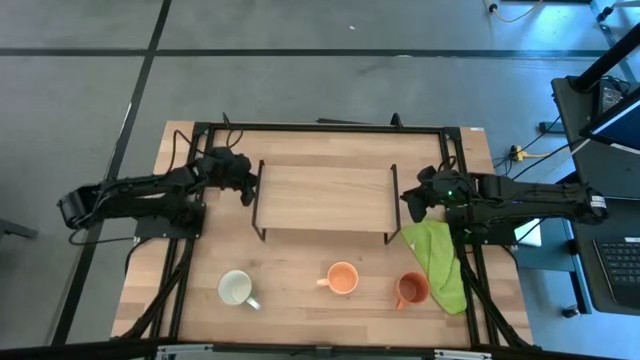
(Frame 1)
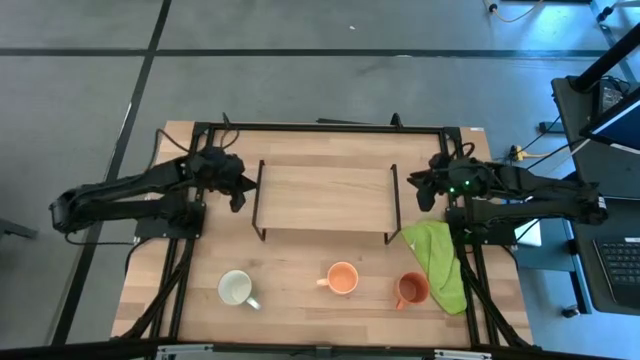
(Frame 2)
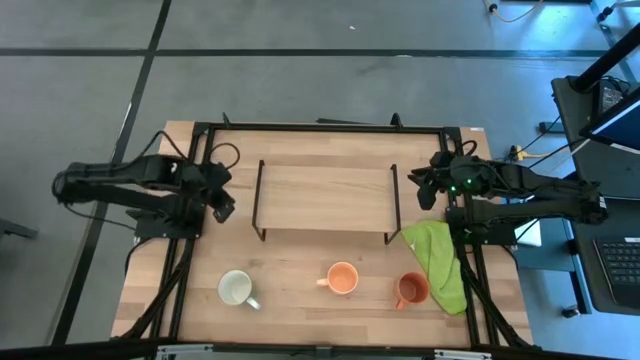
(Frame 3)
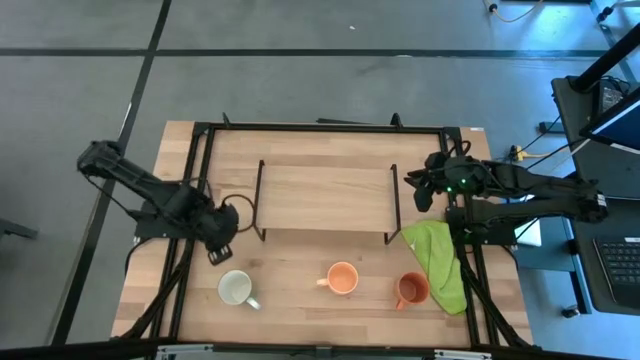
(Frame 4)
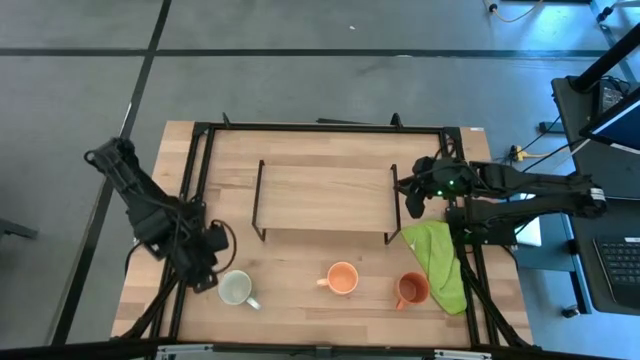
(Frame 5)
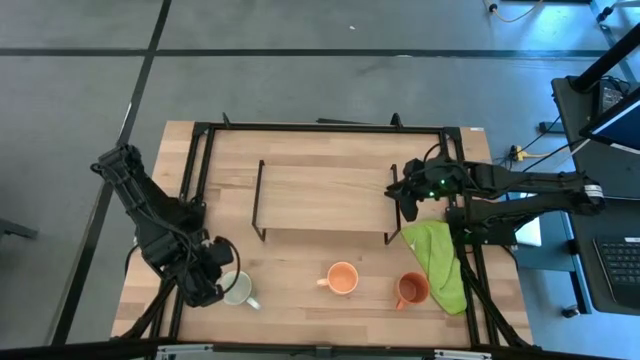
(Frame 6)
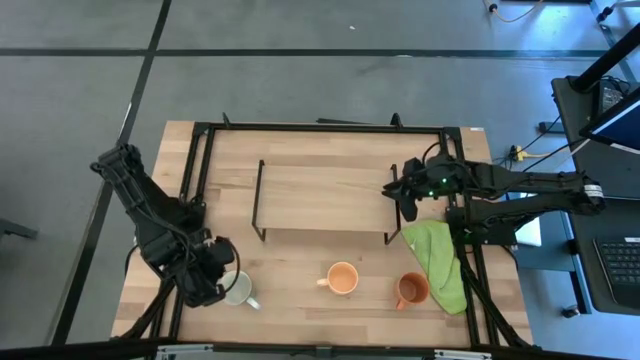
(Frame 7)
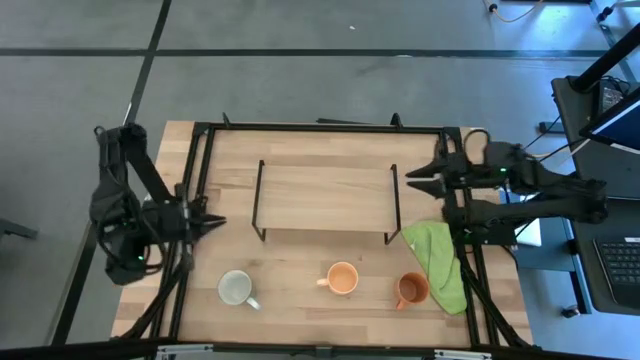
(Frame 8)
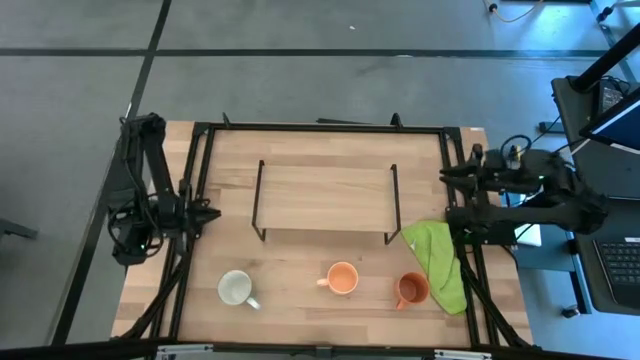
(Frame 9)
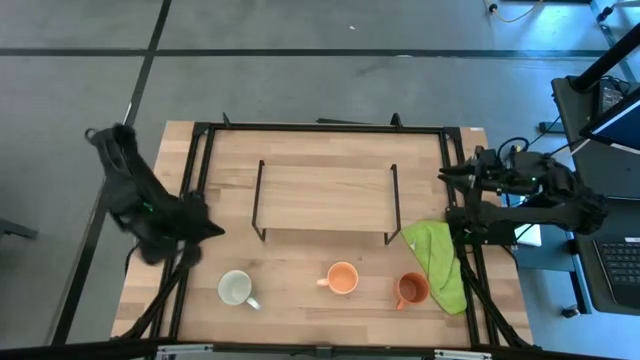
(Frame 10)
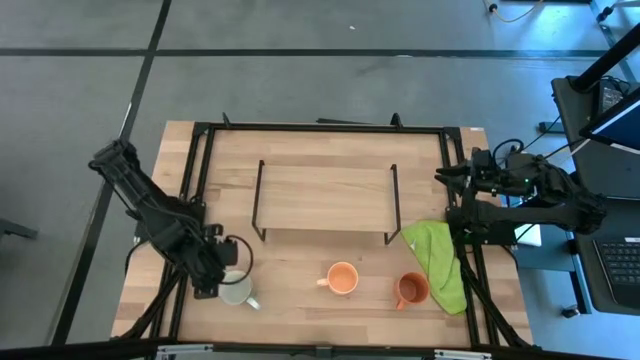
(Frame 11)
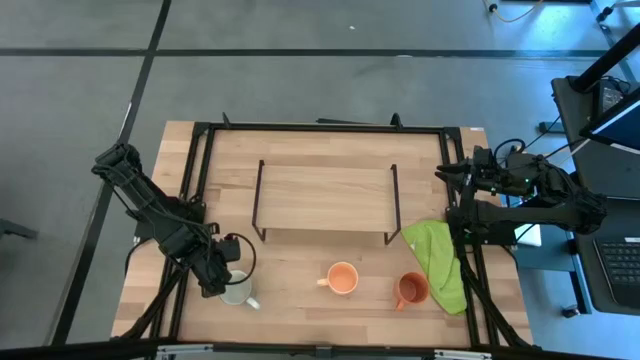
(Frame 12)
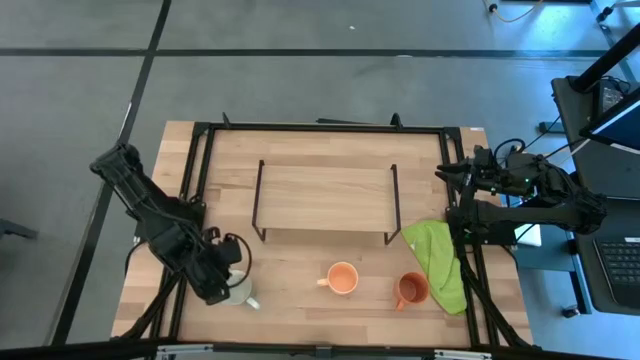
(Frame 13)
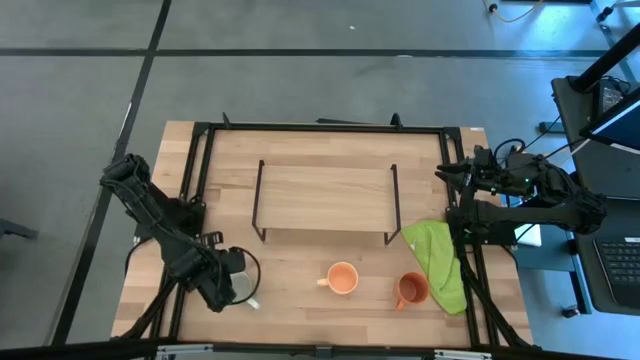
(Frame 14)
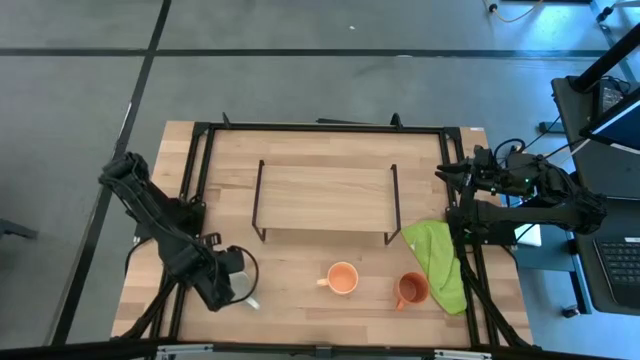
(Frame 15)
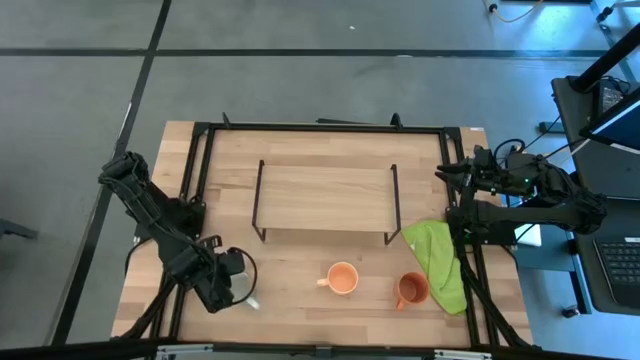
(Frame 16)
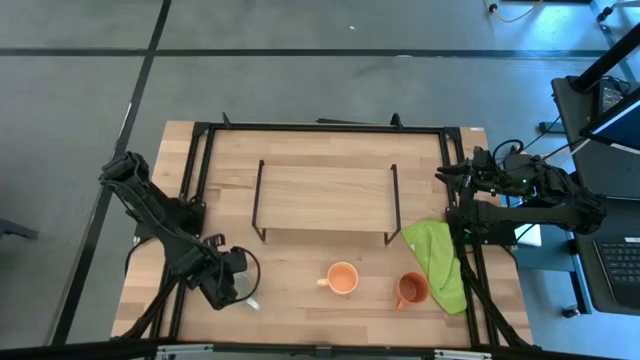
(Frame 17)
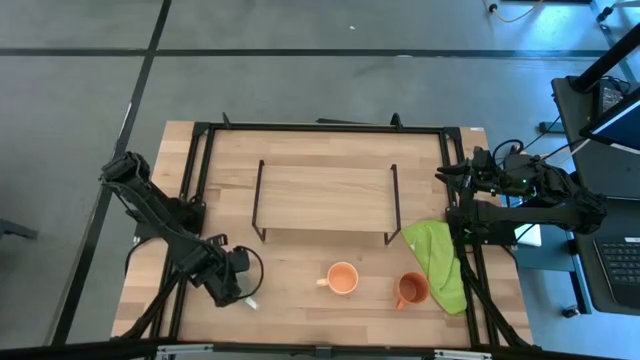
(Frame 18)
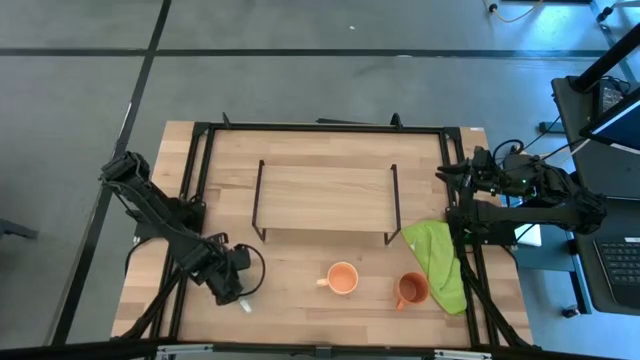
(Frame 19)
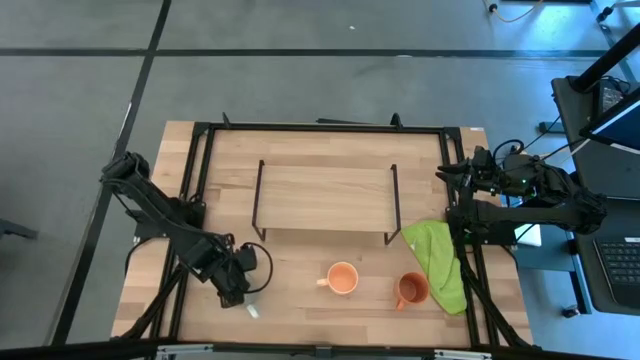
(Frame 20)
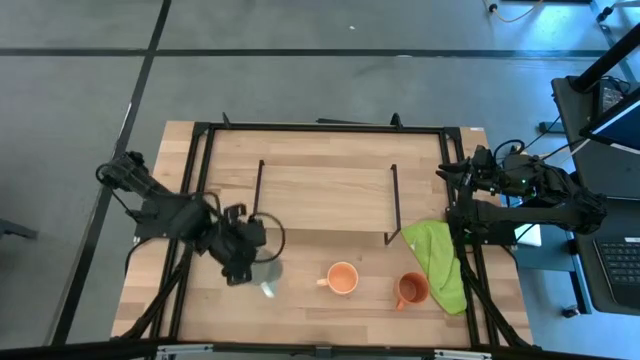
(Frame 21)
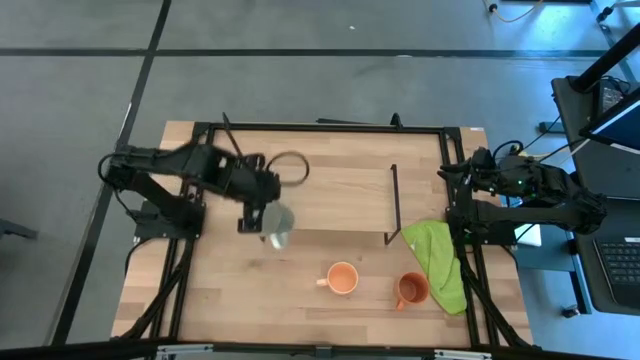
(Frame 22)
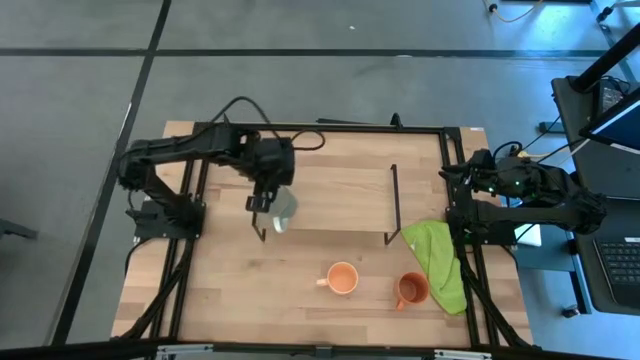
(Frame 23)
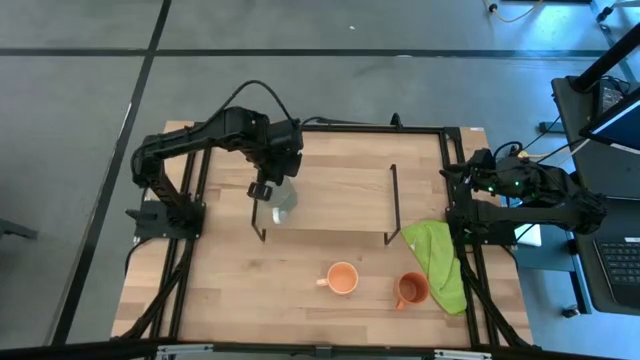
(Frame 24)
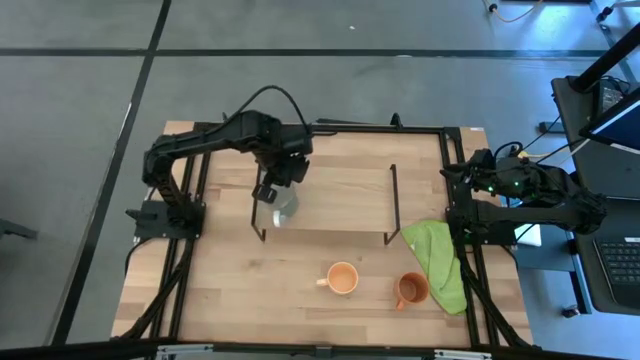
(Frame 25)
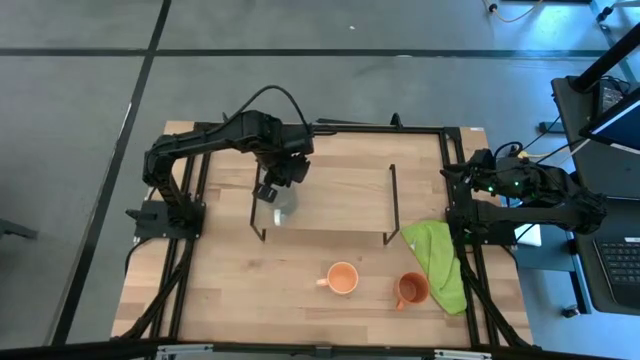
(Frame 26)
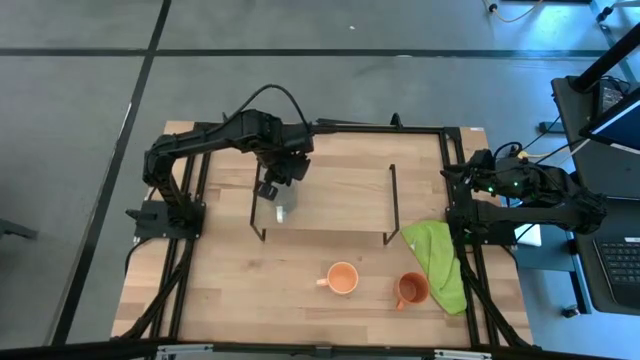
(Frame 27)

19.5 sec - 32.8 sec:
Task: Stack small to large cups/mugs on shelf
Put the blue mug on the shelf
